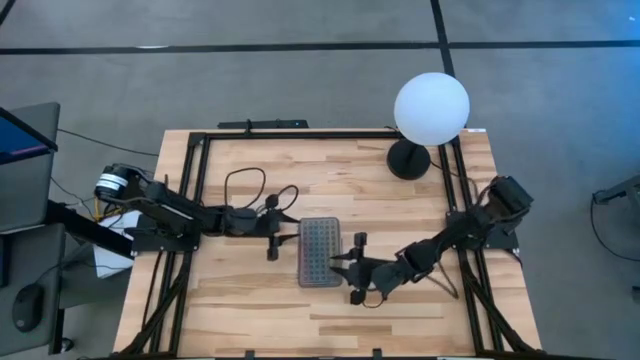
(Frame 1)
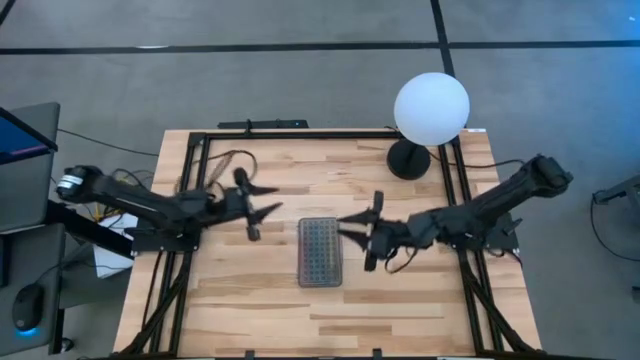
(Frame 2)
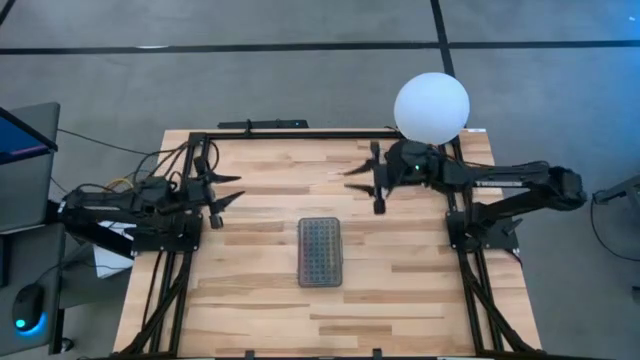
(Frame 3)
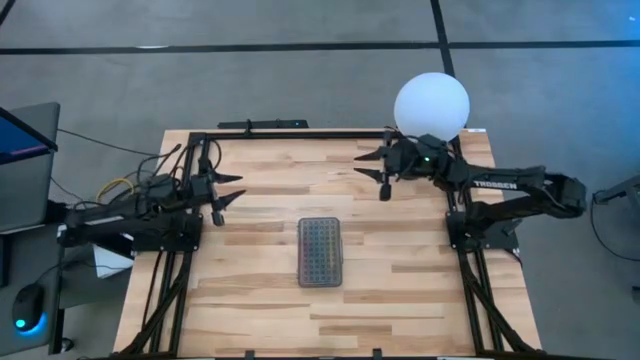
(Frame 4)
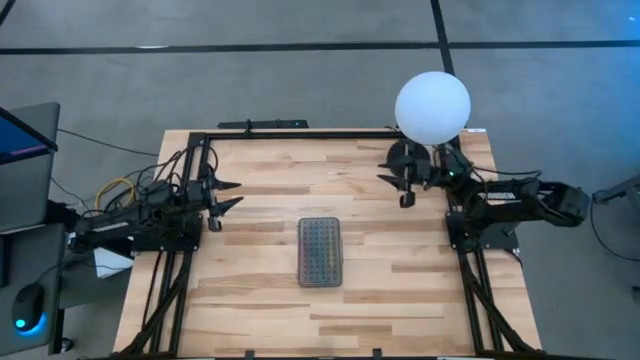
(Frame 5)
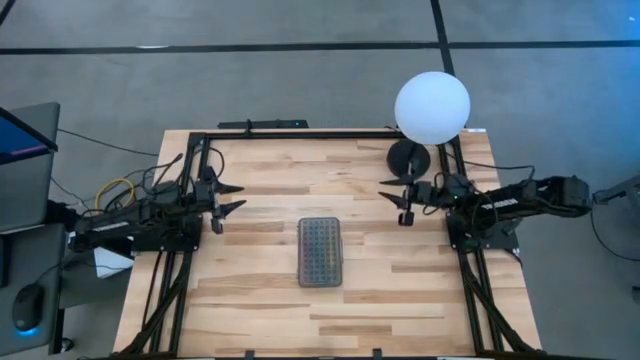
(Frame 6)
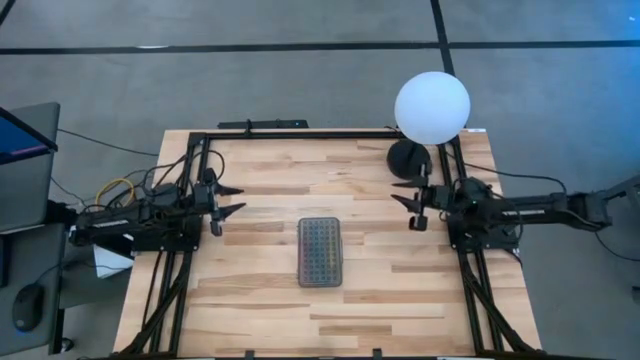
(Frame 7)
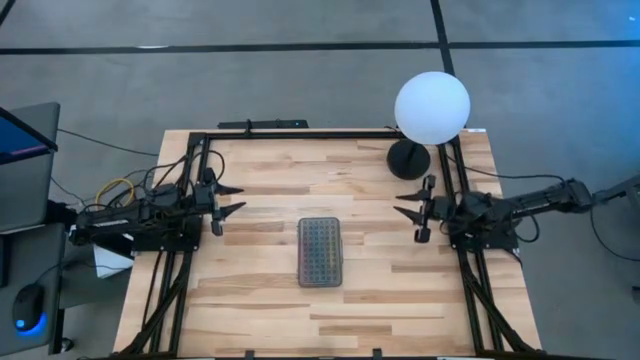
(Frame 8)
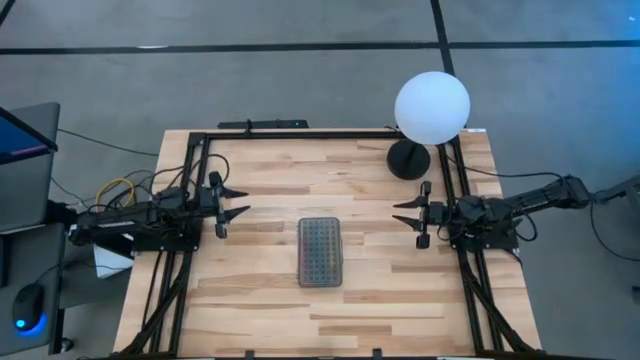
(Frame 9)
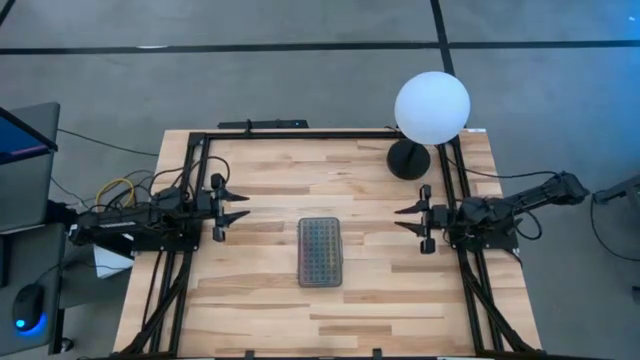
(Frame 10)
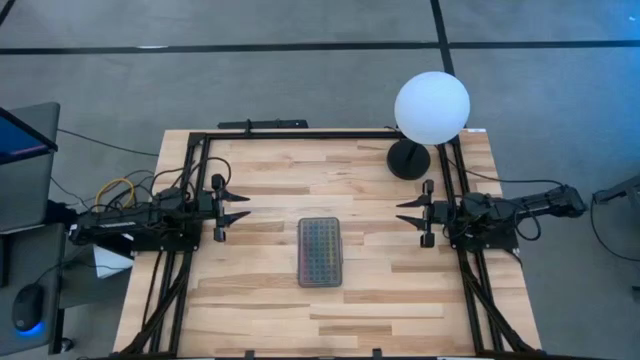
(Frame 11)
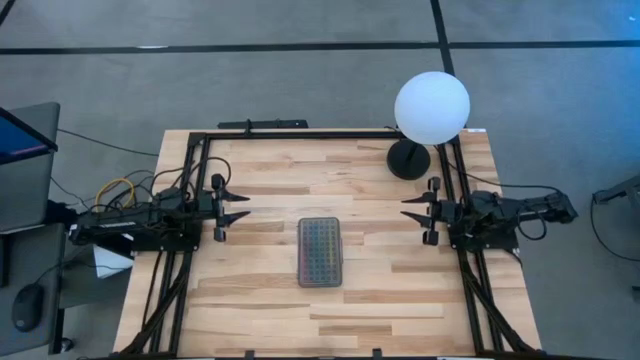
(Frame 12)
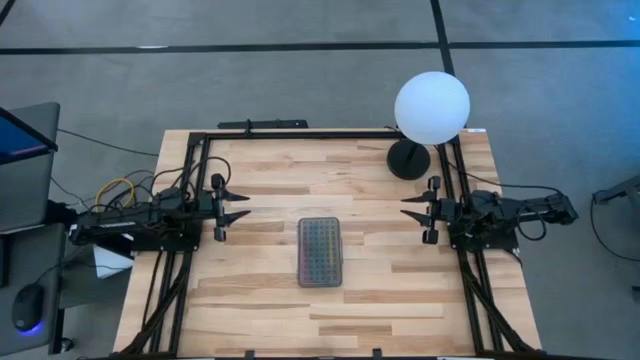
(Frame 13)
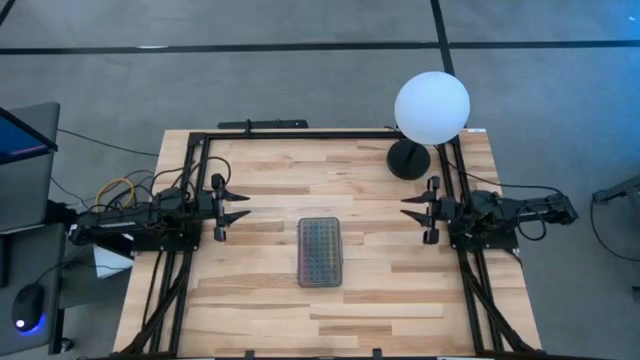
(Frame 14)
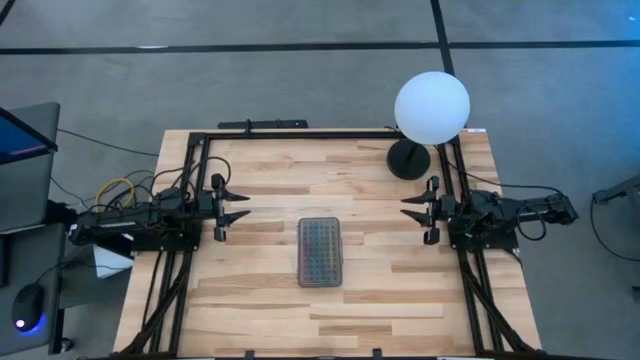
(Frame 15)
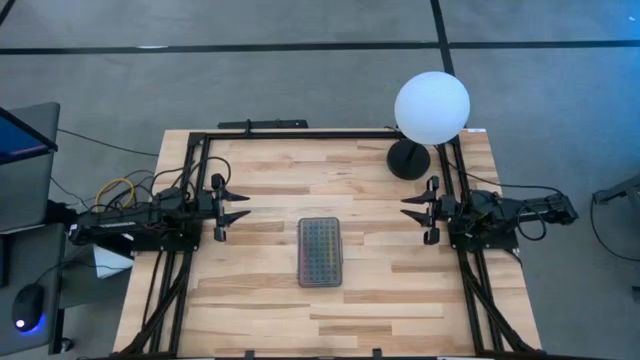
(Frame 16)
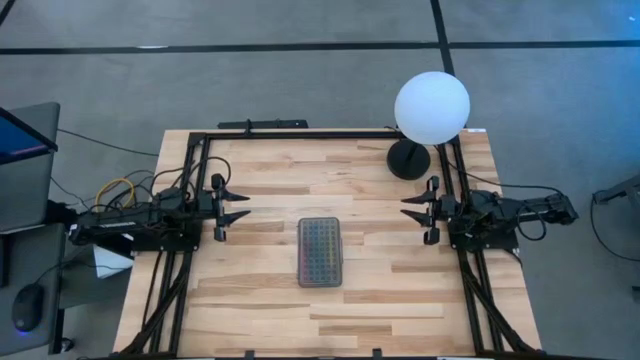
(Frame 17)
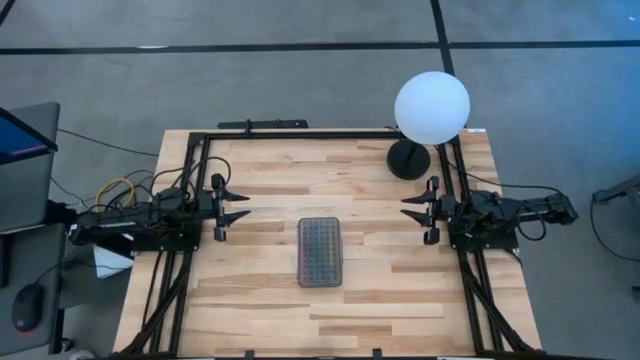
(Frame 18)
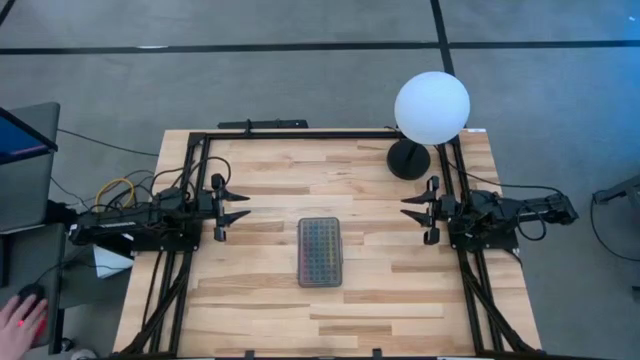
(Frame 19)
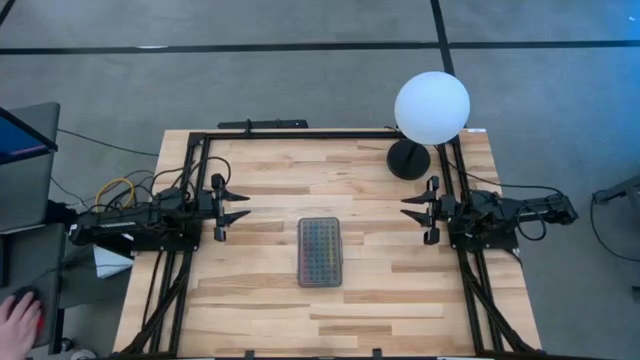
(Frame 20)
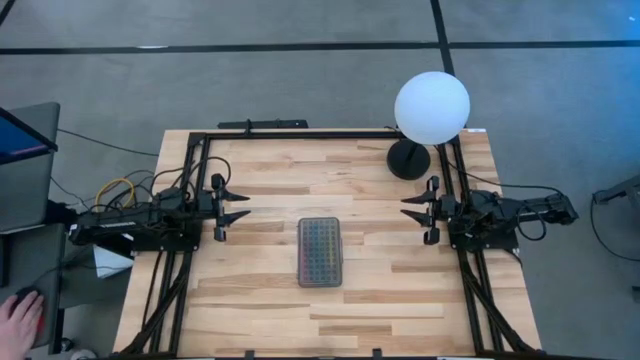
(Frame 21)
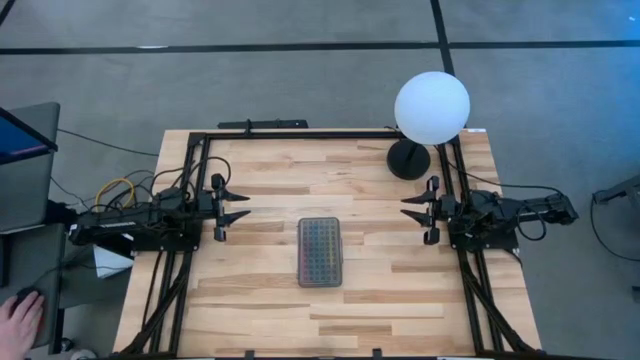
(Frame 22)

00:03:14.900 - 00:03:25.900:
Task: Pick & place school supplies into a supply box
Return to Home Position

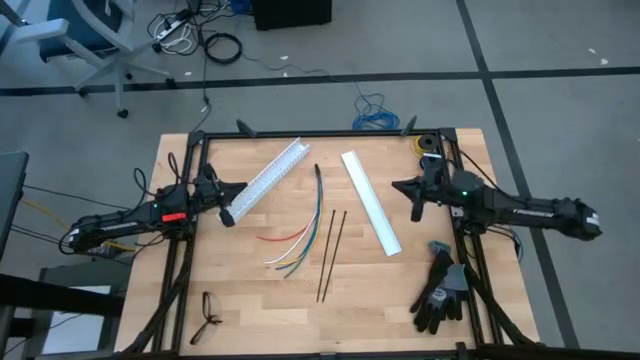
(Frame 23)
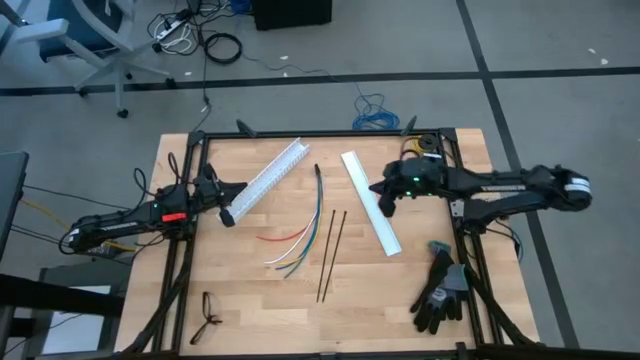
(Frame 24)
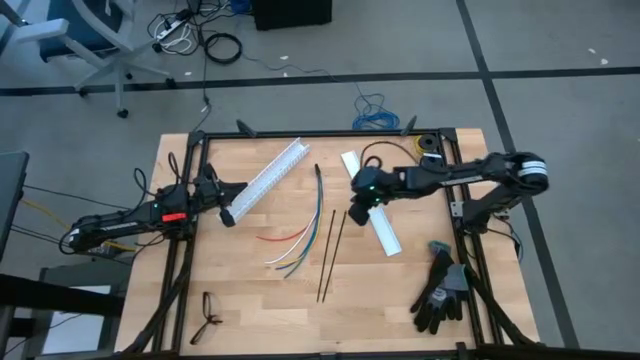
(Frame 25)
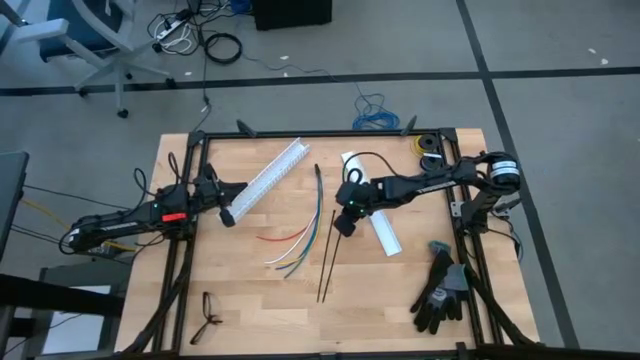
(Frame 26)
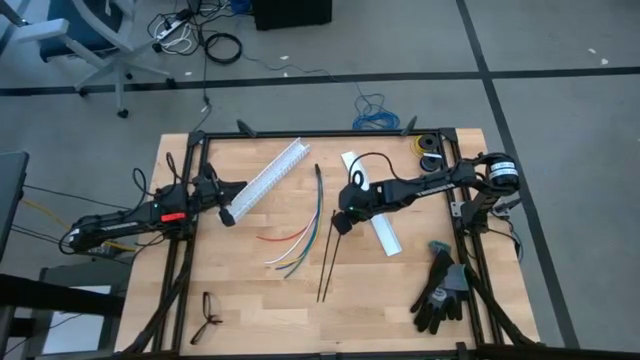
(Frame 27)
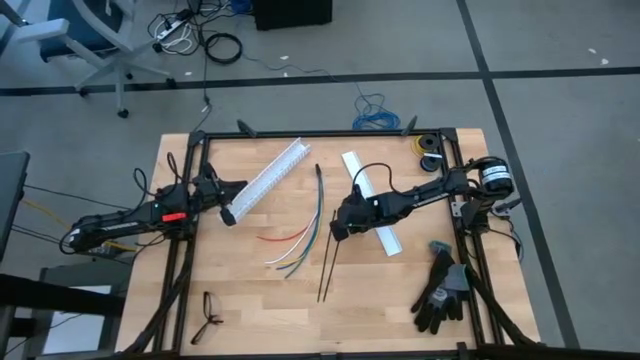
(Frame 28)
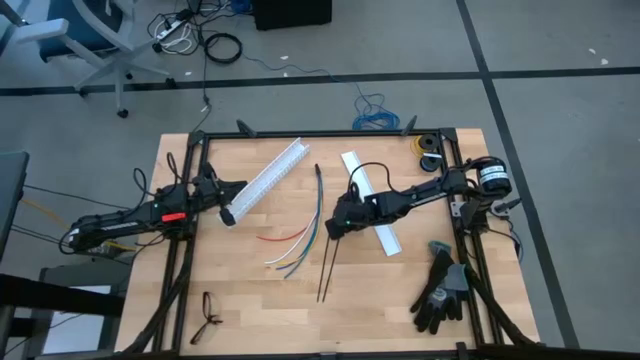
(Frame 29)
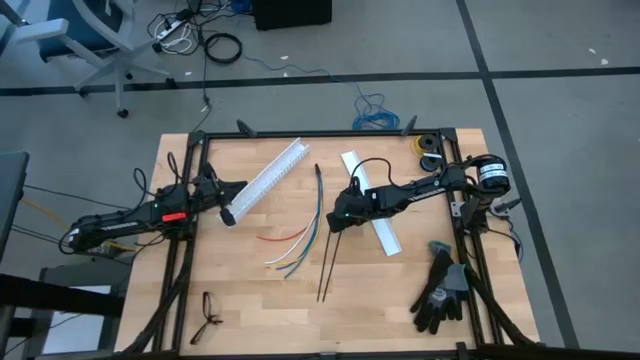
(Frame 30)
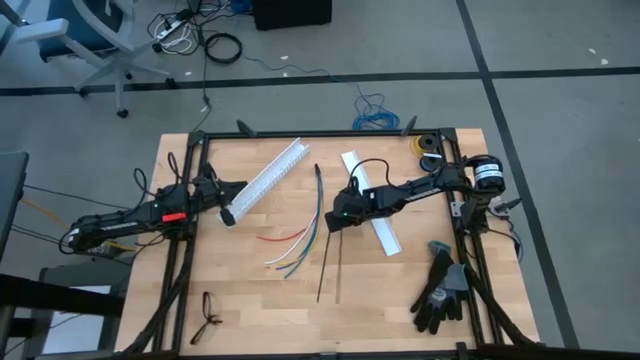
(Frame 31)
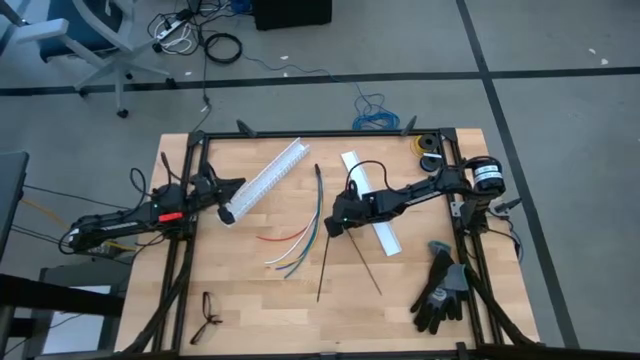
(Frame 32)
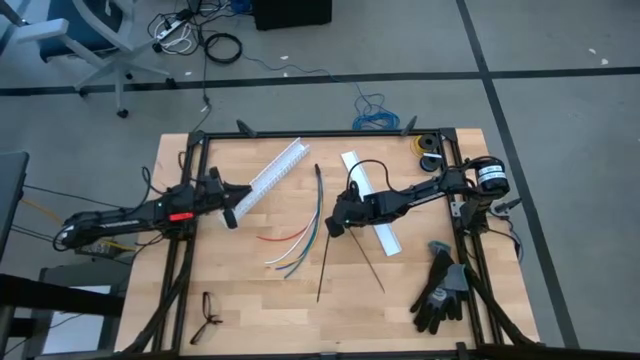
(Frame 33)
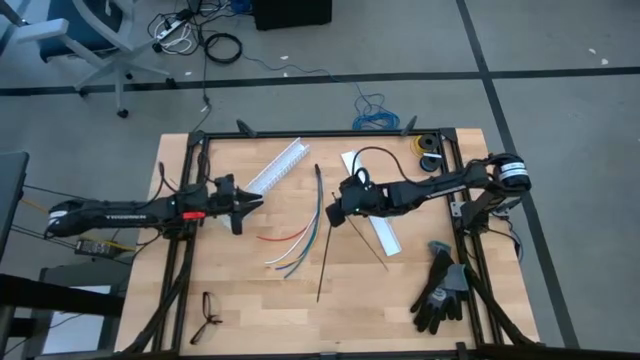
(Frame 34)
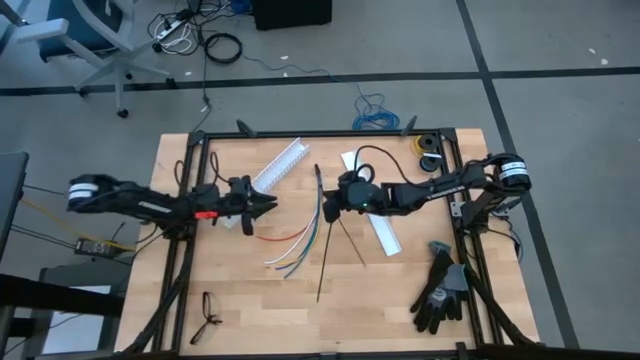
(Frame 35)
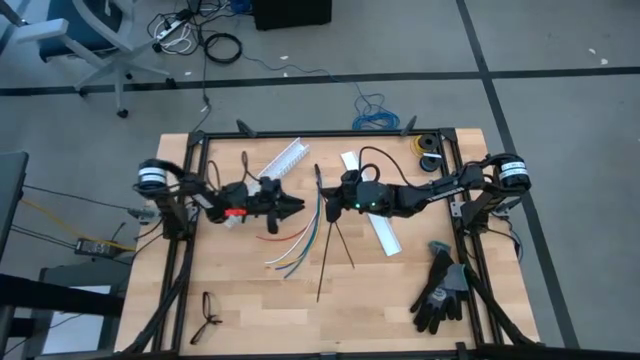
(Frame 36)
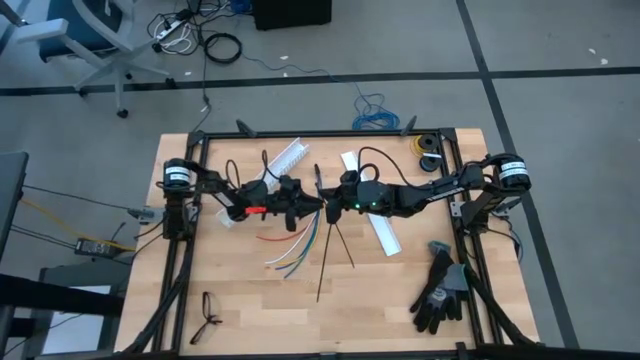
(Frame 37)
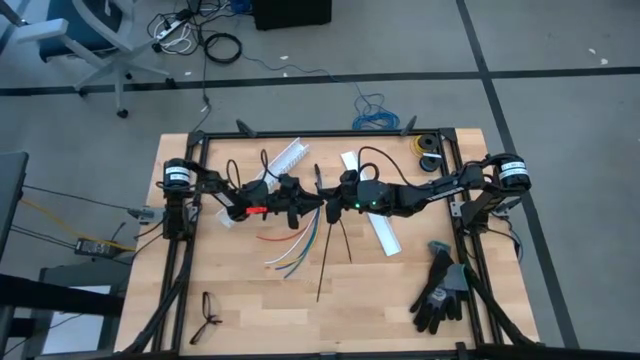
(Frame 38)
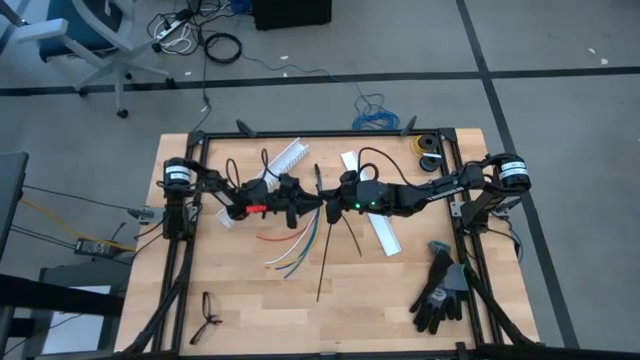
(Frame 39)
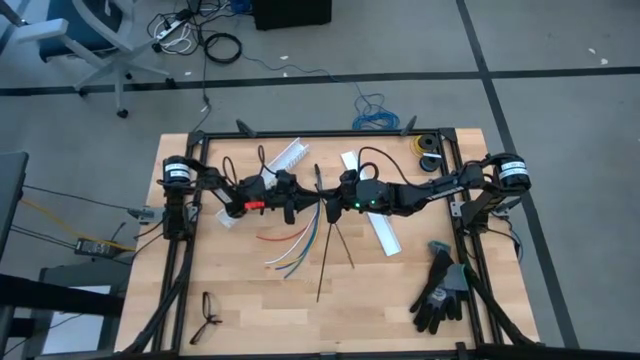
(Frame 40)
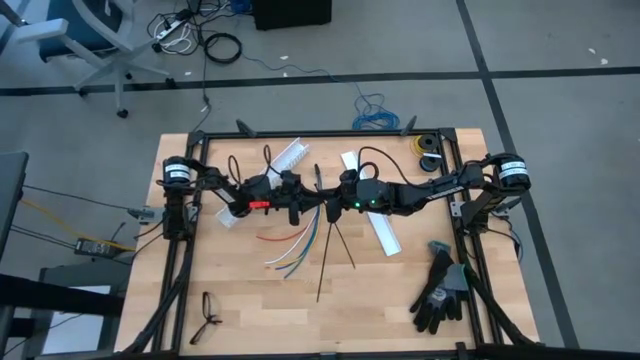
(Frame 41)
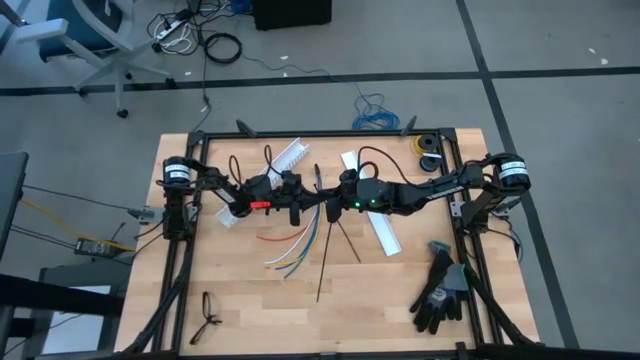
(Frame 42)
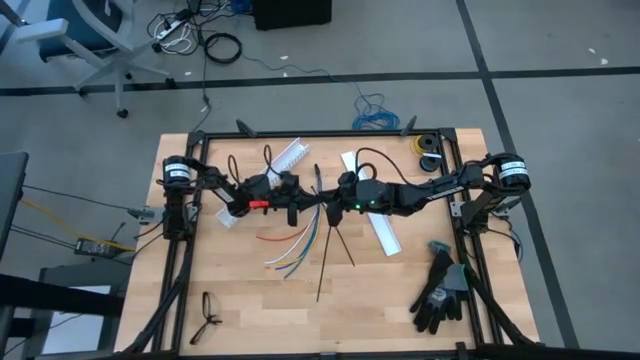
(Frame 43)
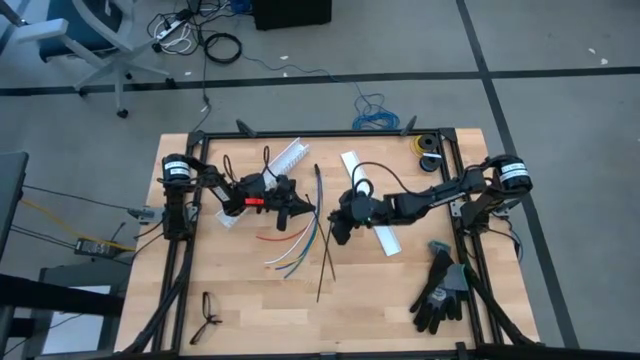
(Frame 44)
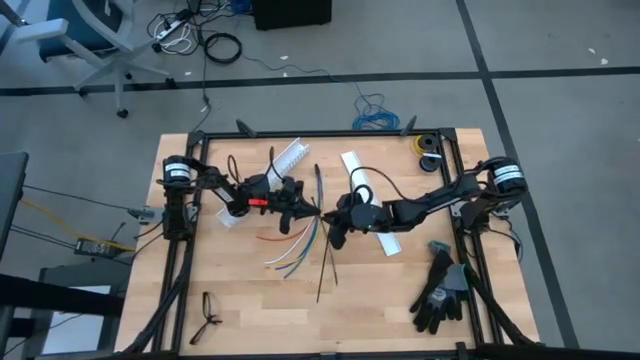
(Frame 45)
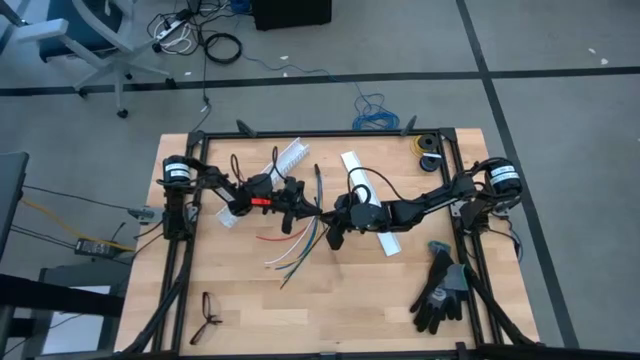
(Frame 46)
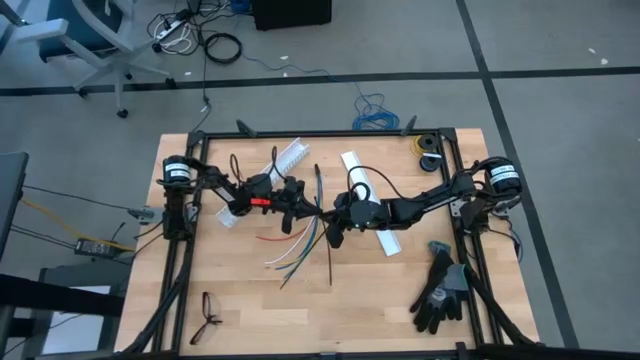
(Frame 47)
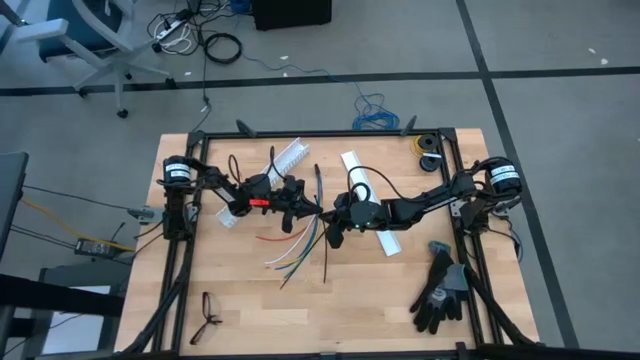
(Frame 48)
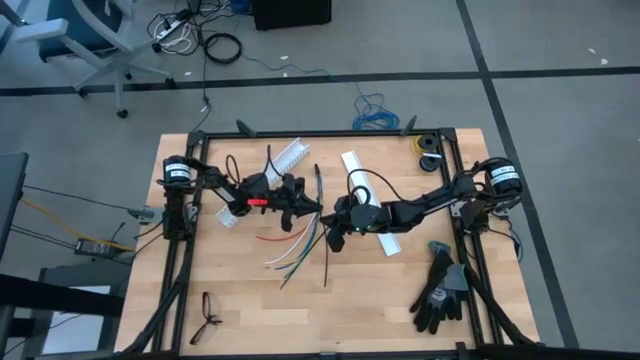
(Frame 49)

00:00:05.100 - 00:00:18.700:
Task: Ziptie cables
Prepare the right black zip tie to wrap the cable wires
